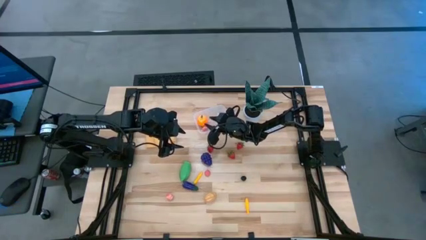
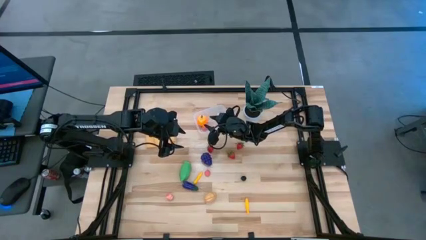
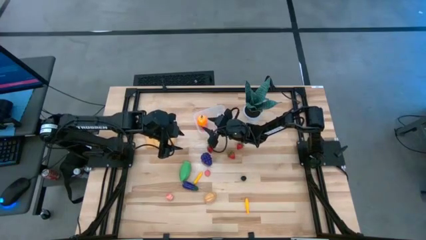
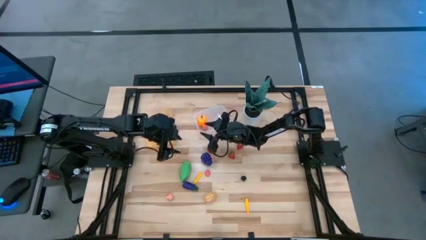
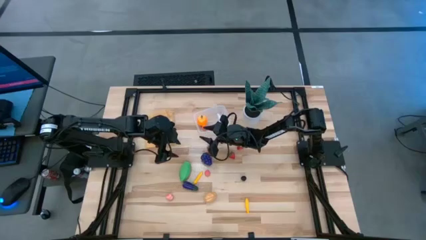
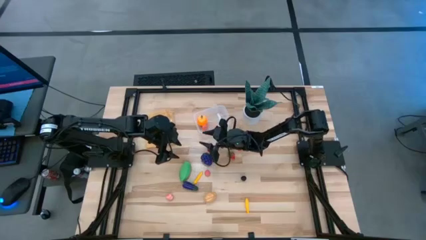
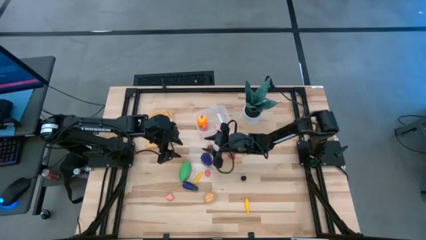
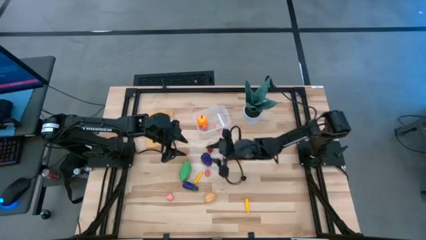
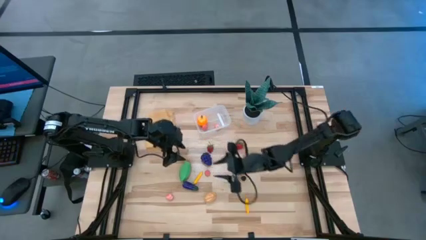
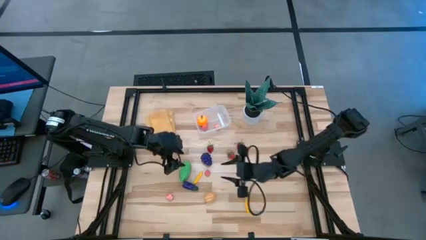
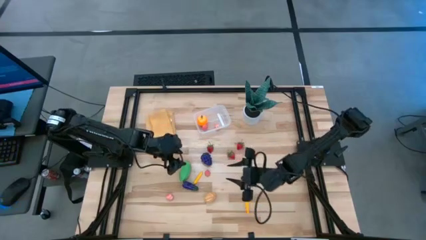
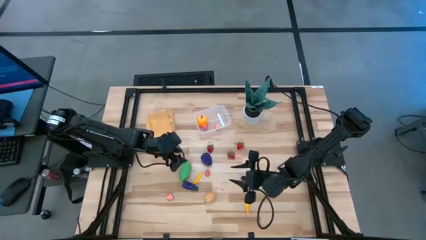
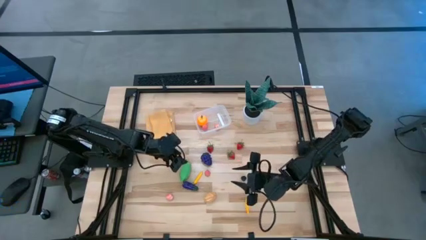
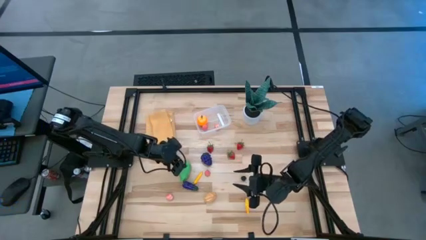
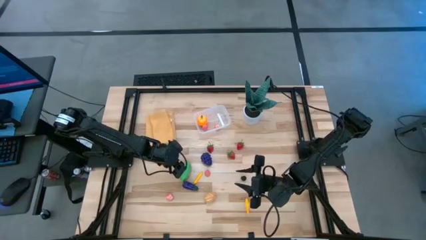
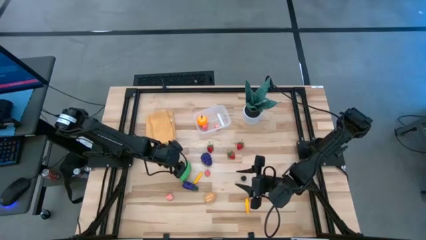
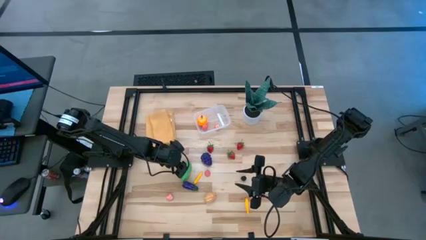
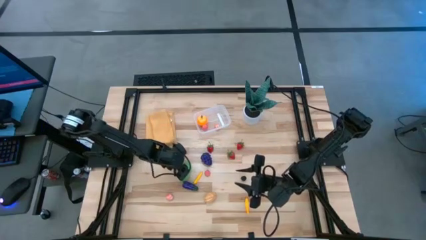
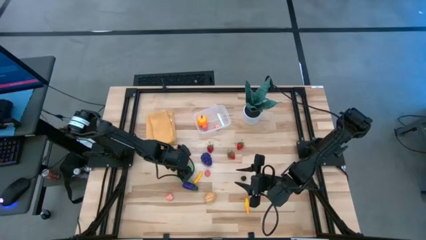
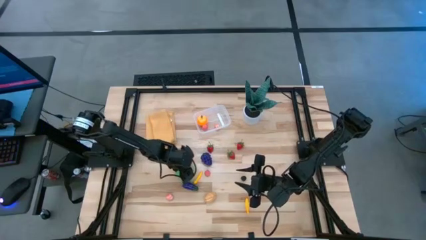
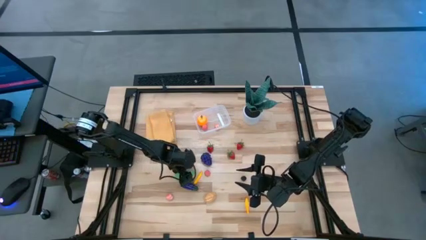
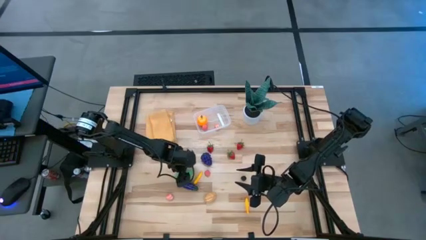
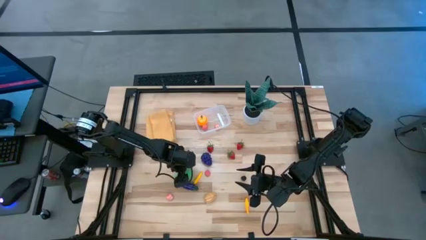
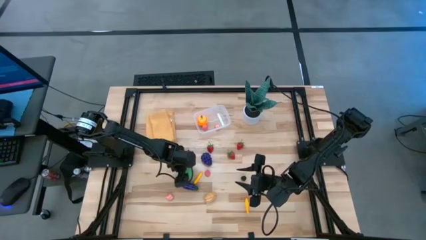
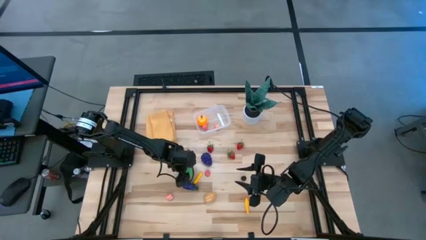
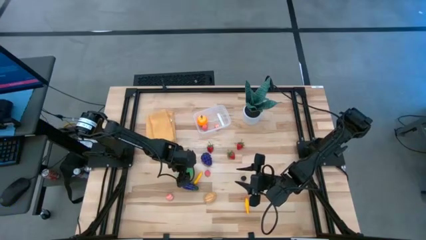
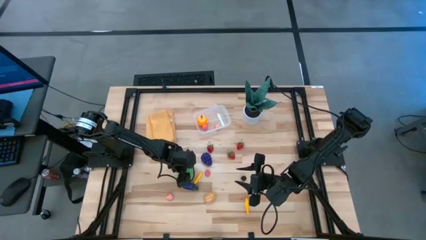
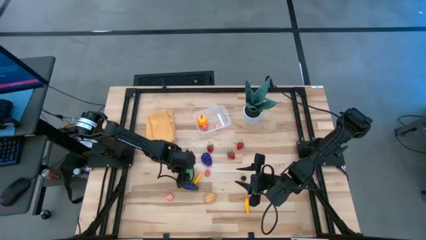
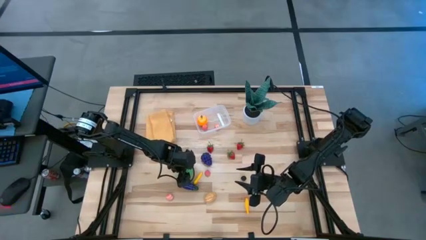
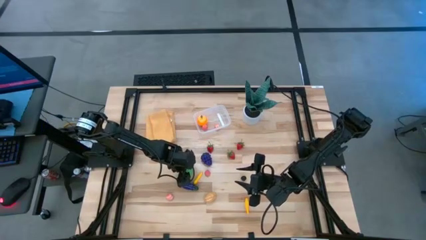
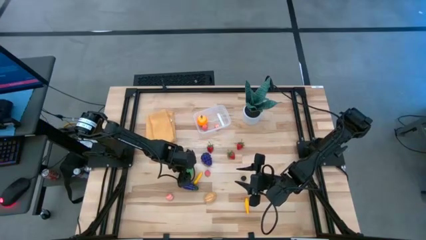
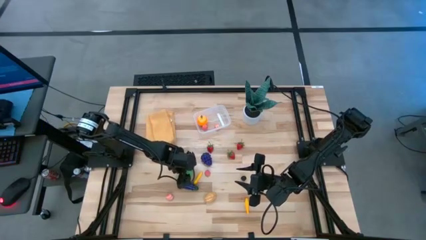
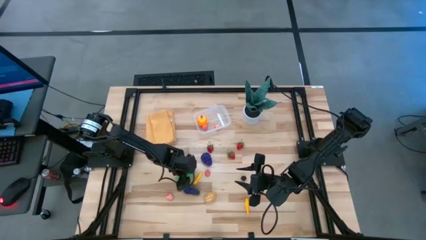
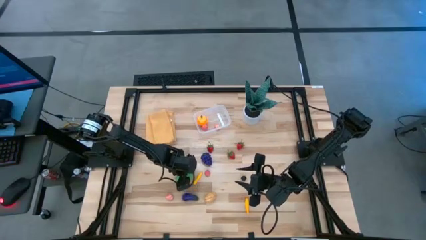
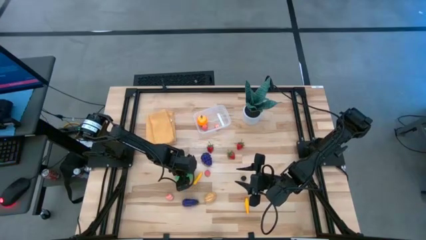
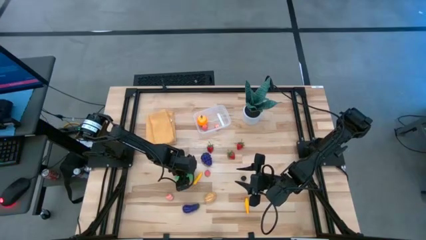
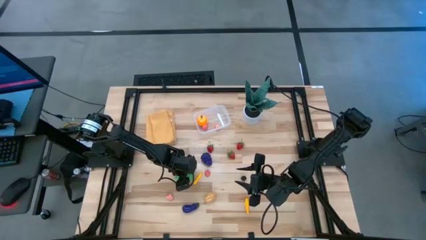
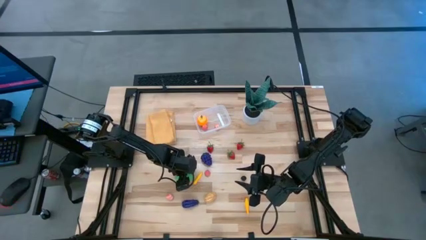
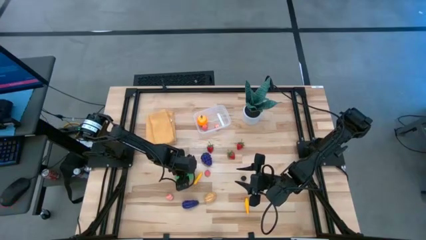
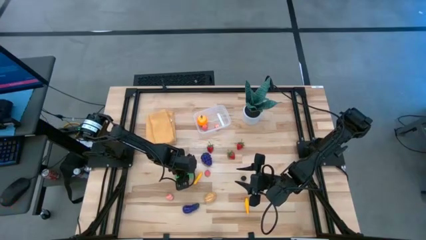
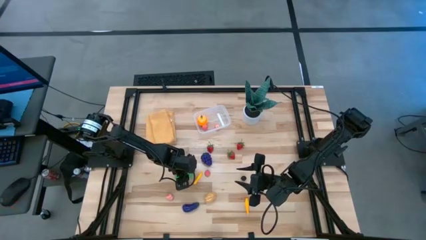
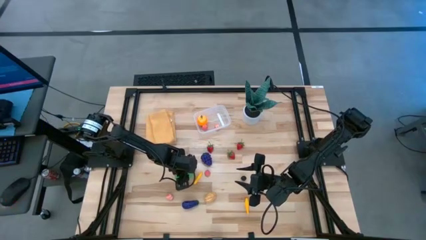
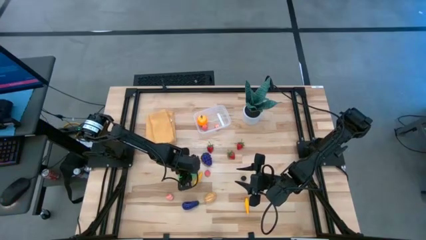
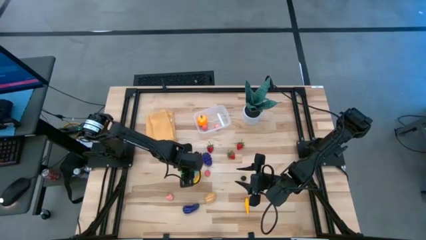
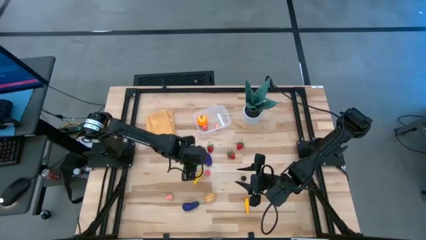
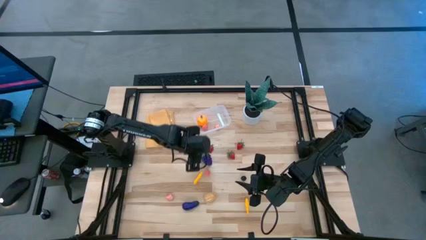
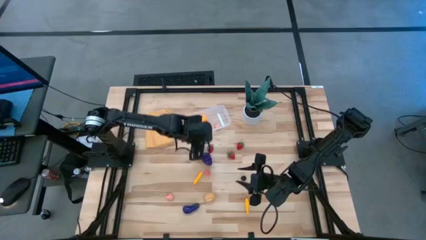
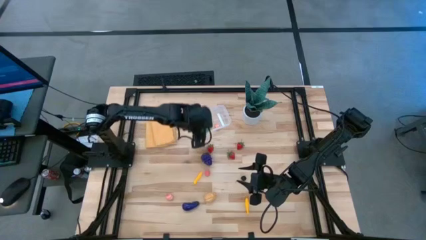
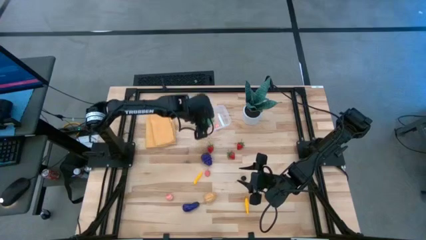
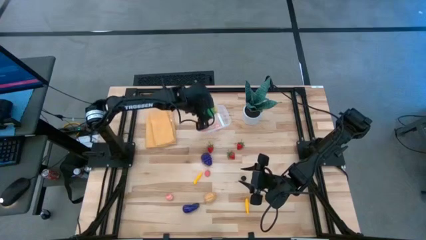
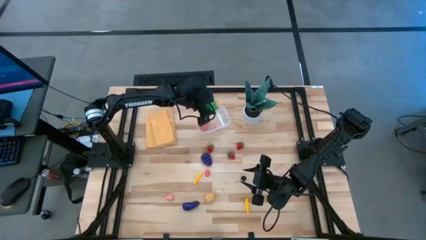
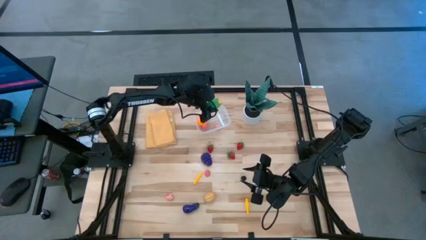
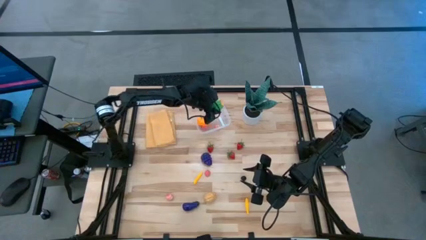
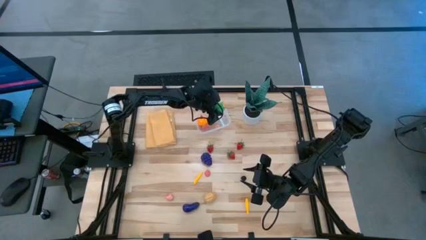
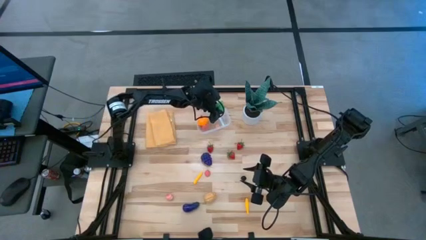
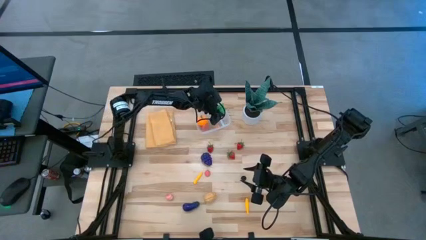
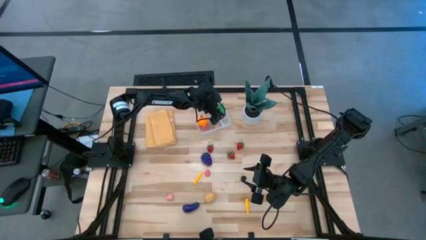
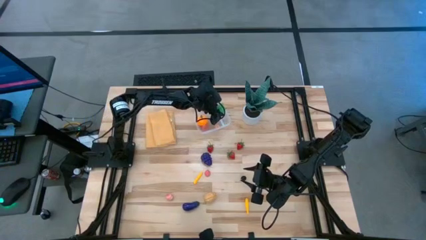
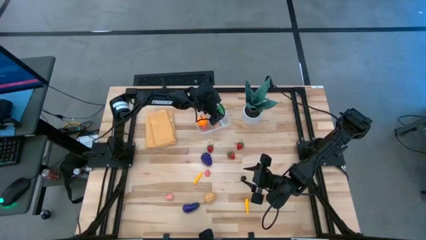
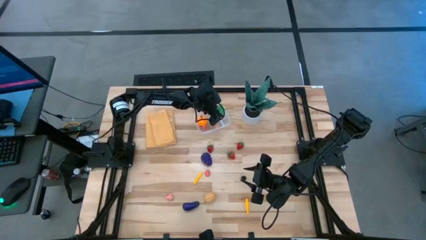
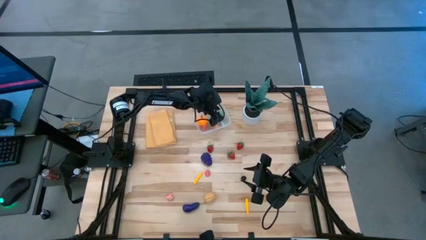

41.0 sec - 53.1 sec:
Task: Pick and placing Produce into tupperware
Put the green corn into the transparent bin

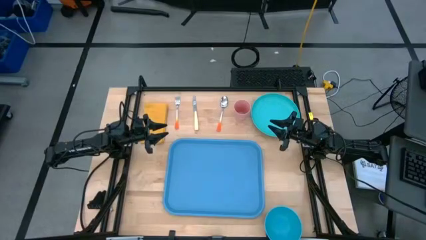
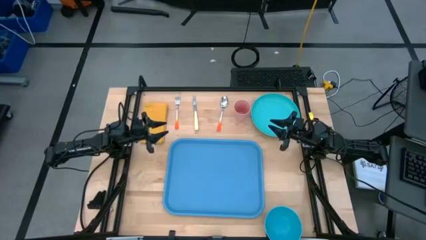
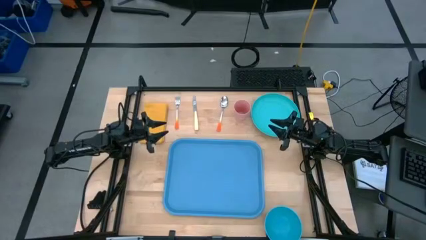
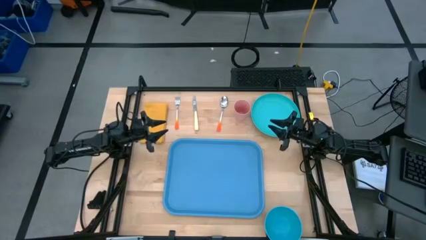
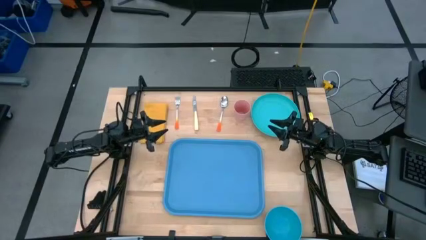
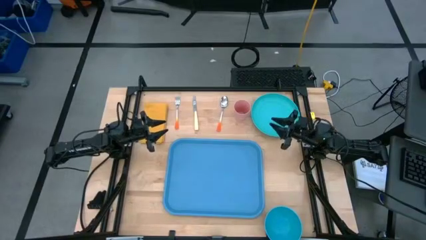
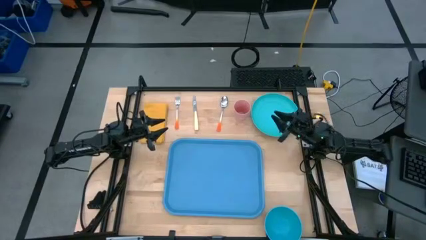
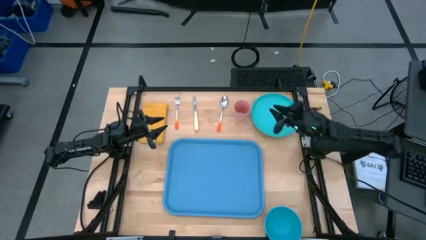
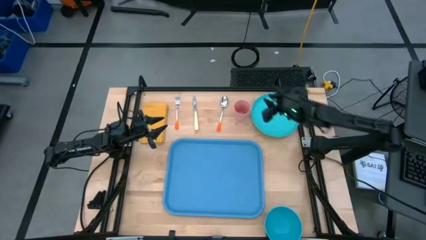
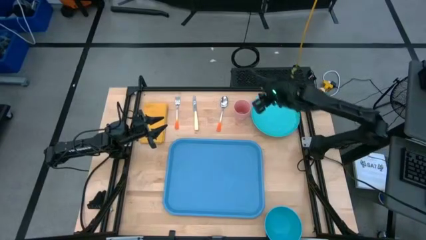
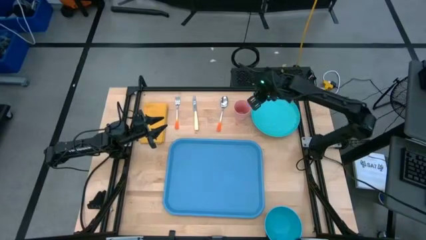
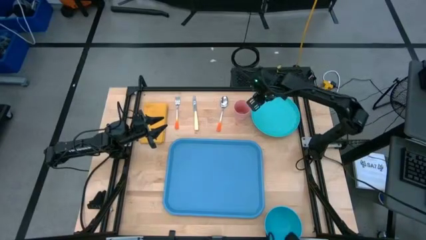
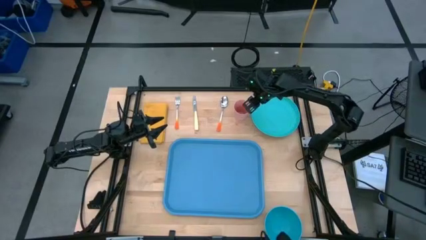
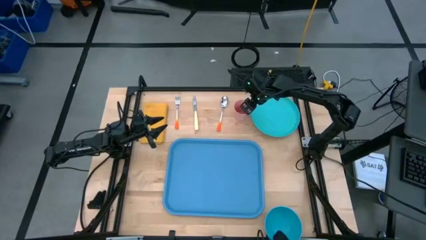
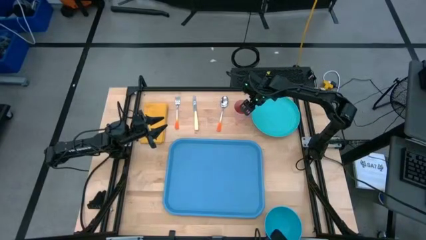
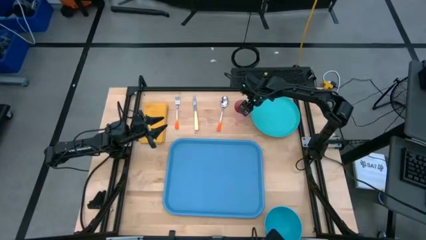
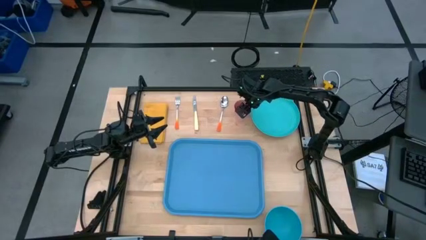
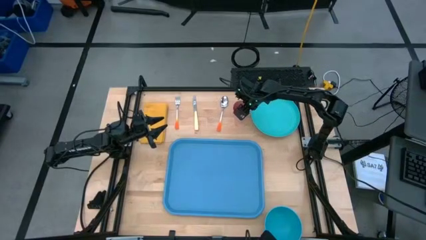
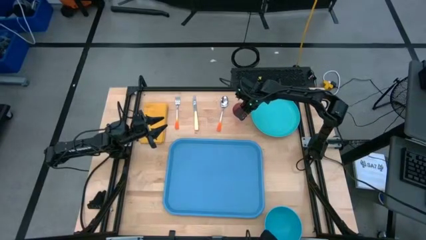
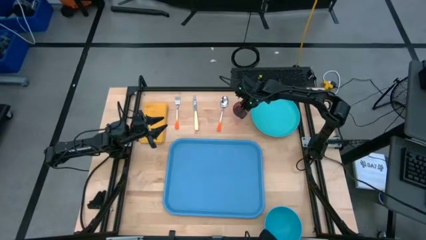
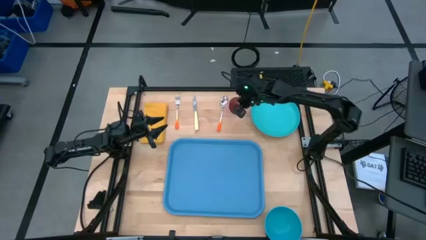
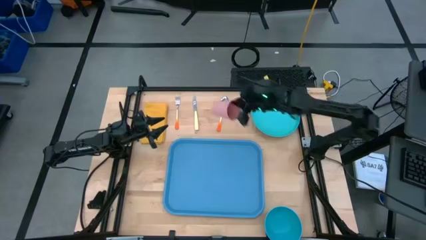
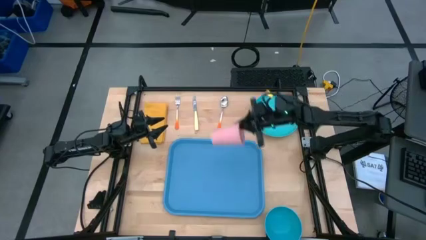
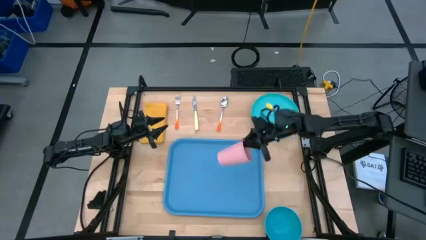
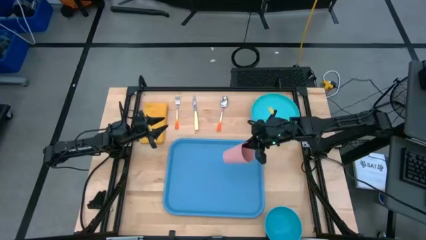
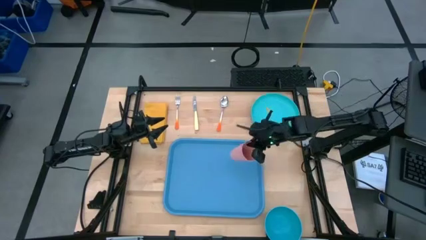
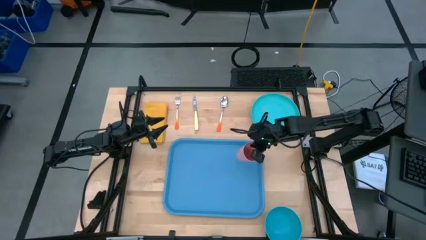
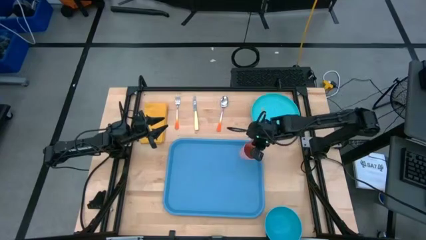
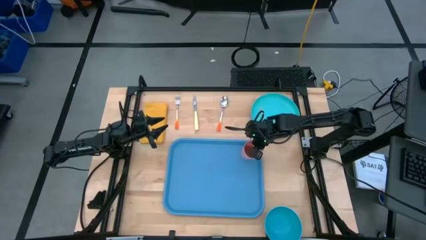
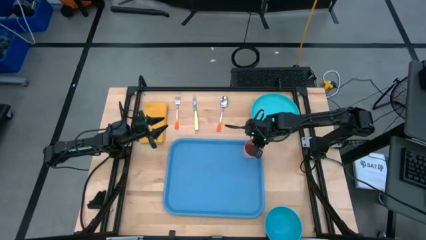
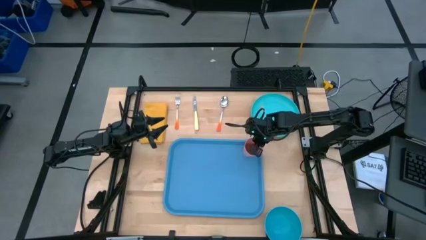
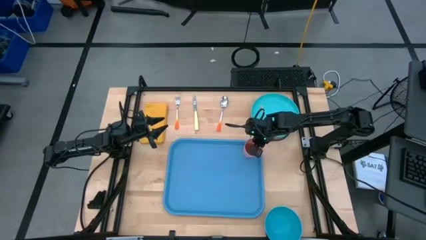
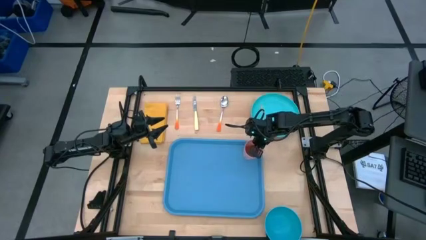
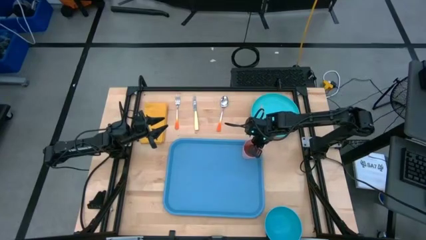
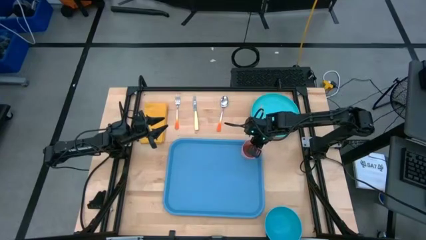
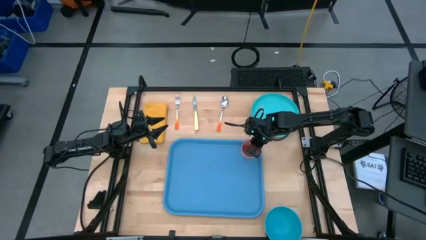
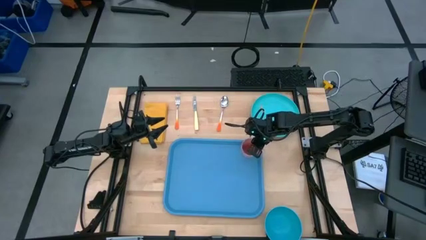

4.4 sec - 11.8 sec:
Task: Set up tray
Put the pink cup on the top right of the blue serving tray
